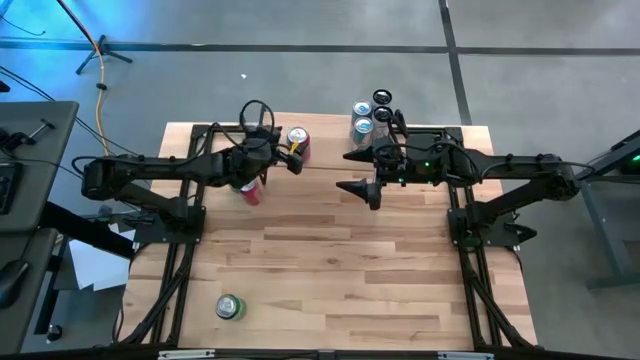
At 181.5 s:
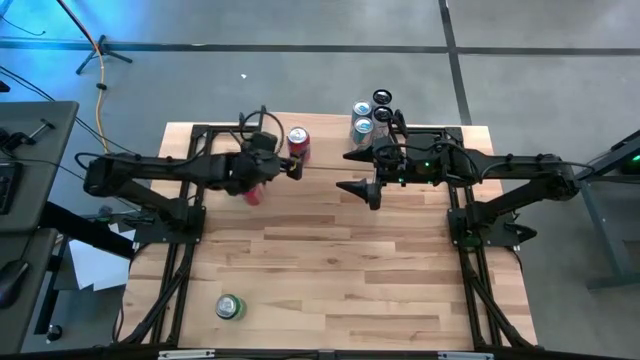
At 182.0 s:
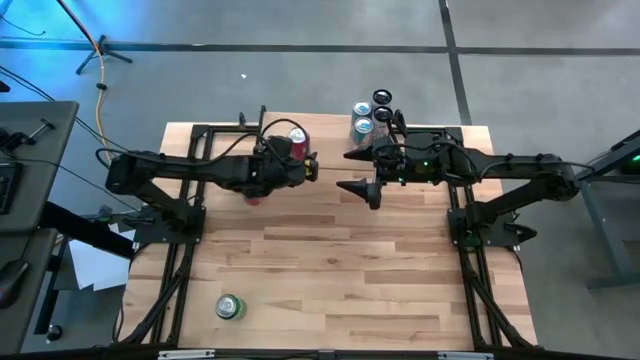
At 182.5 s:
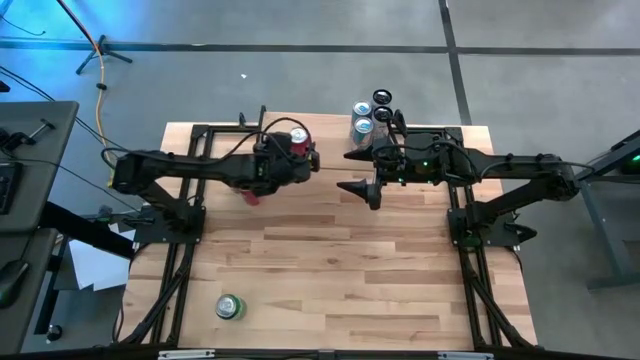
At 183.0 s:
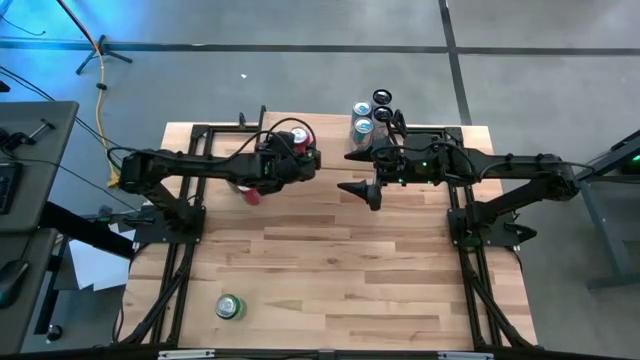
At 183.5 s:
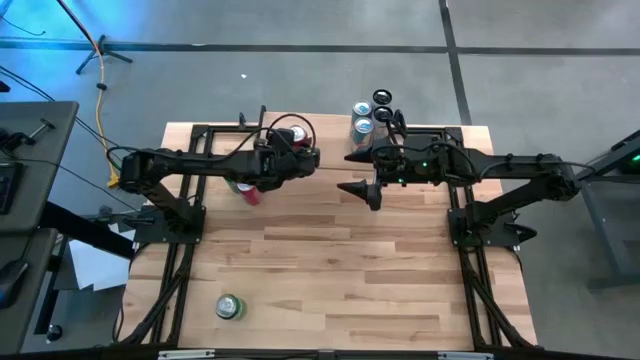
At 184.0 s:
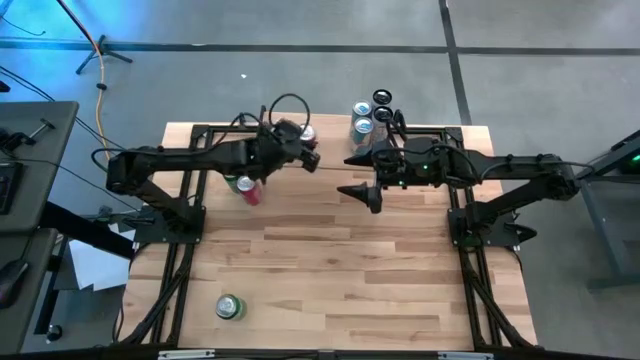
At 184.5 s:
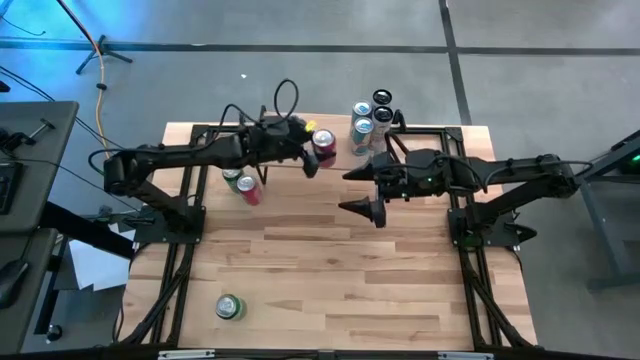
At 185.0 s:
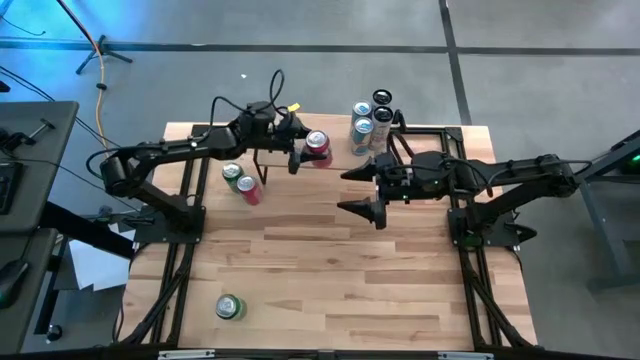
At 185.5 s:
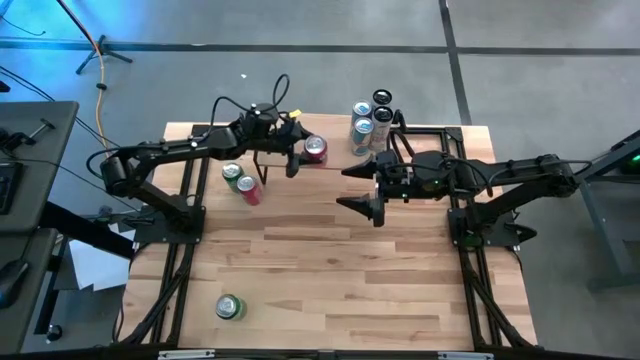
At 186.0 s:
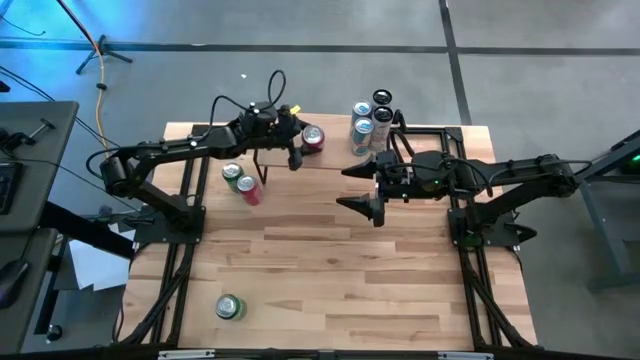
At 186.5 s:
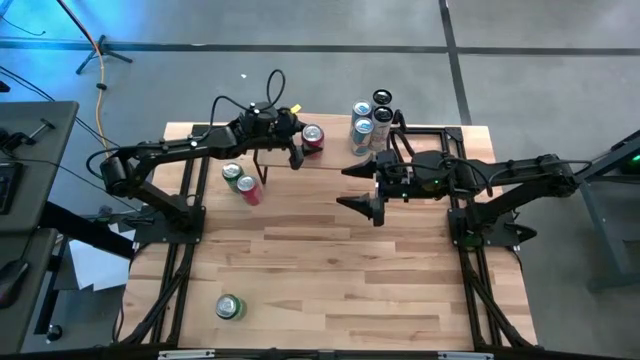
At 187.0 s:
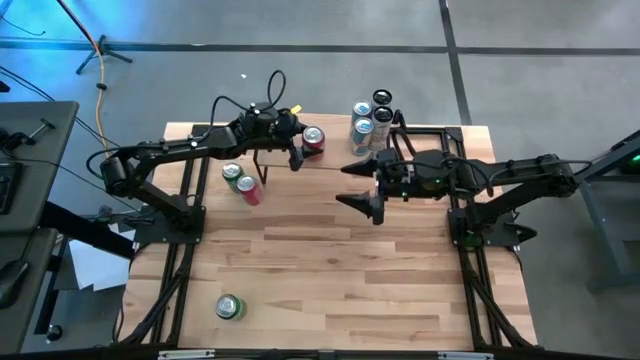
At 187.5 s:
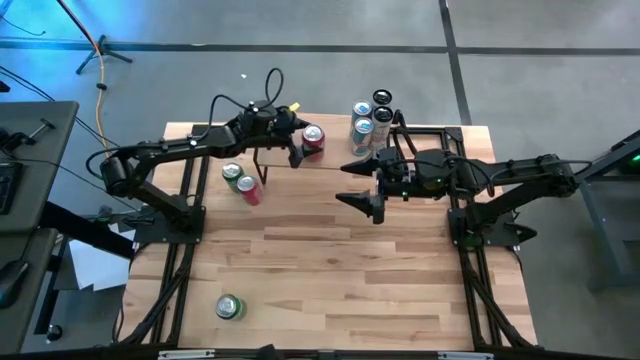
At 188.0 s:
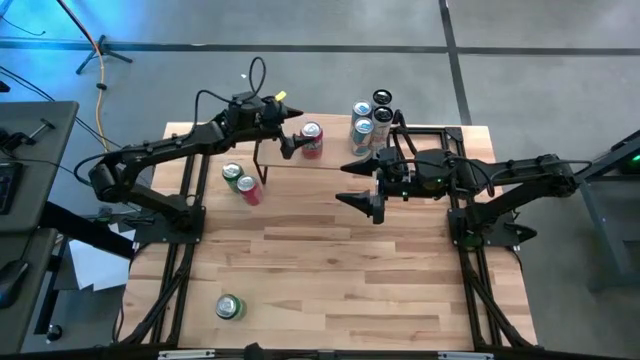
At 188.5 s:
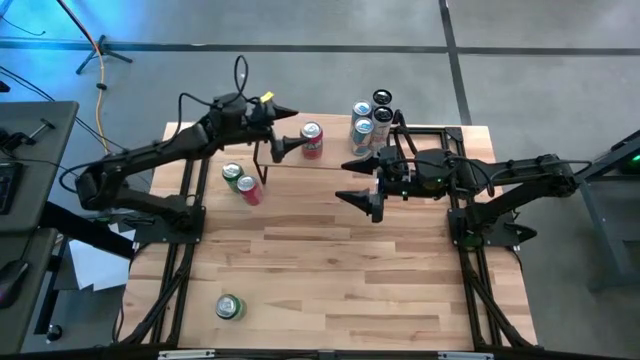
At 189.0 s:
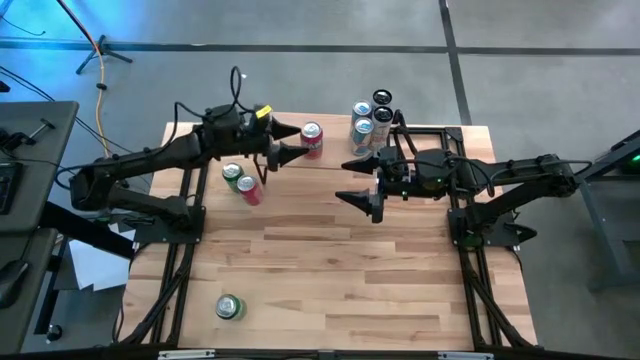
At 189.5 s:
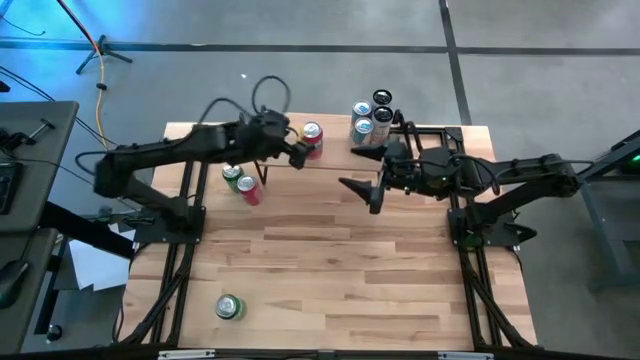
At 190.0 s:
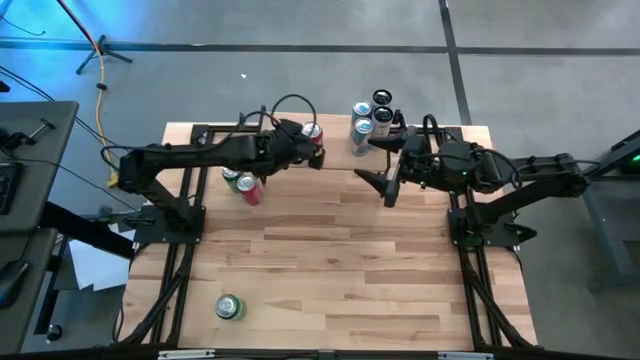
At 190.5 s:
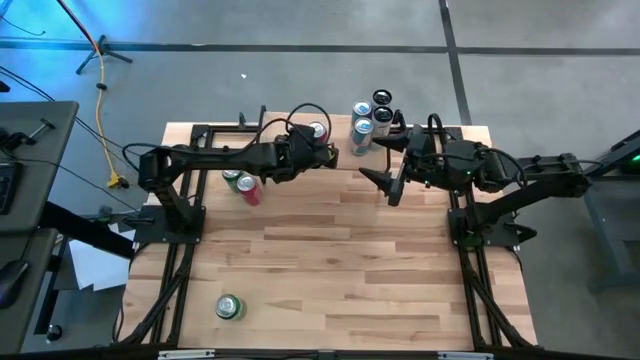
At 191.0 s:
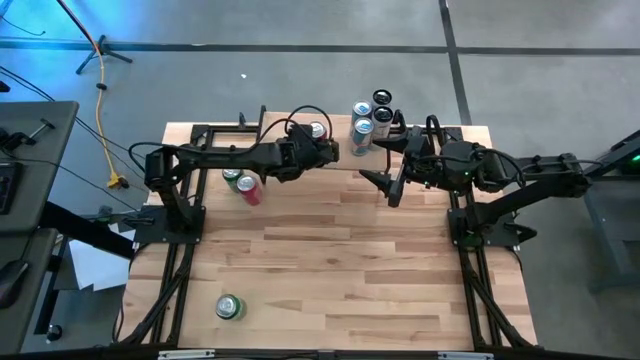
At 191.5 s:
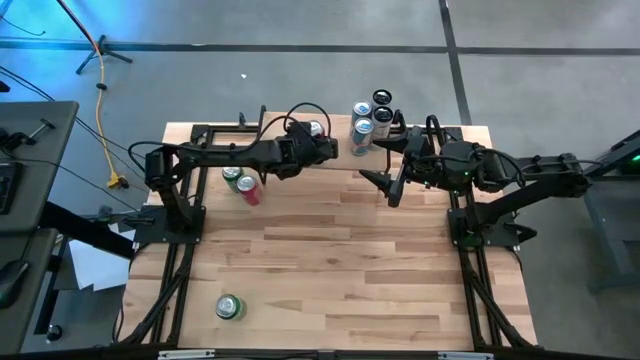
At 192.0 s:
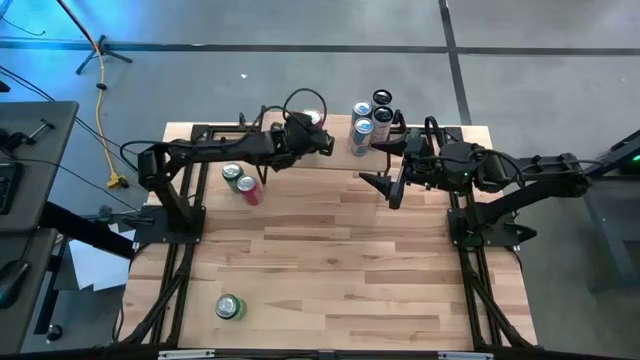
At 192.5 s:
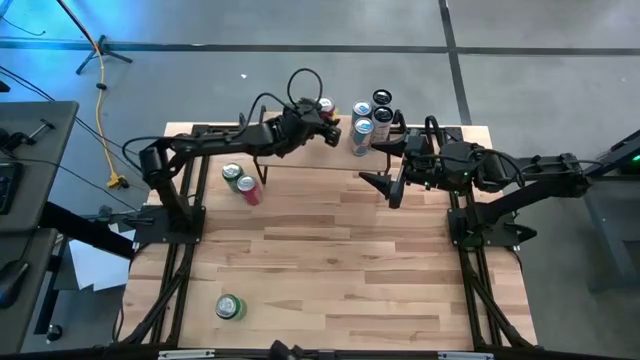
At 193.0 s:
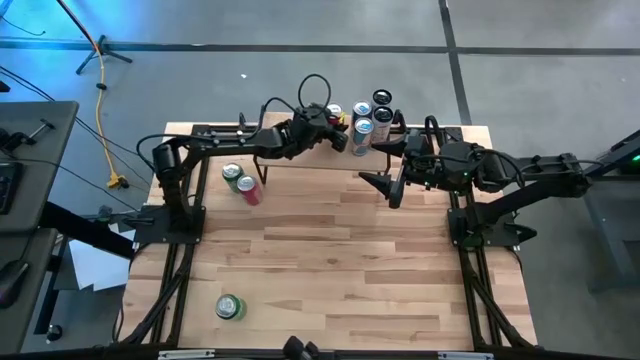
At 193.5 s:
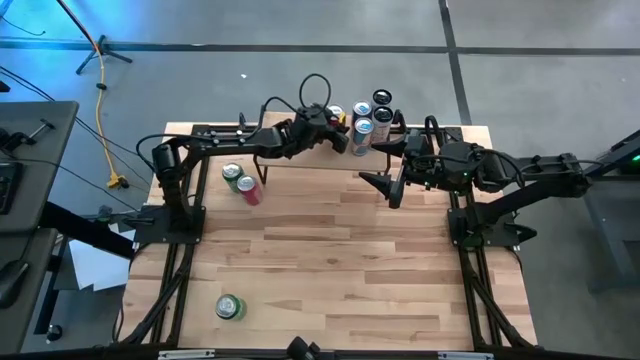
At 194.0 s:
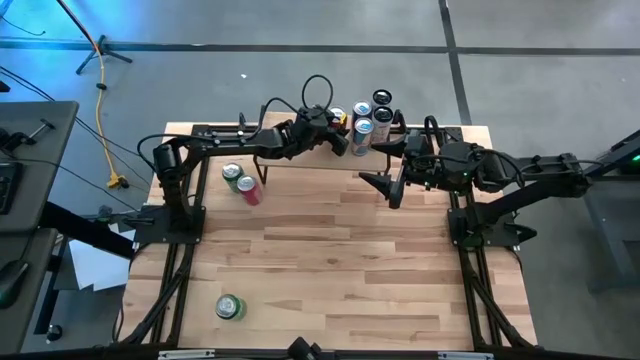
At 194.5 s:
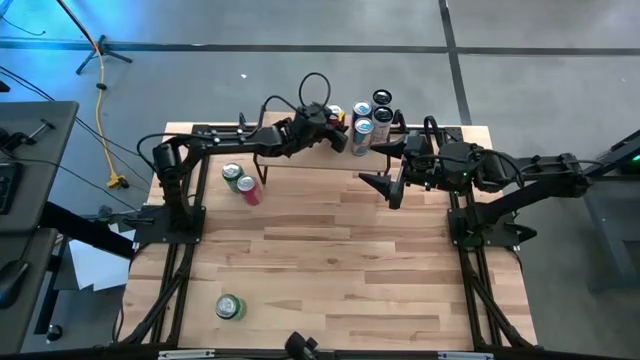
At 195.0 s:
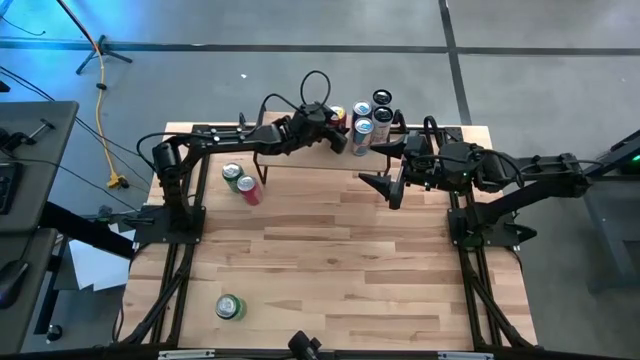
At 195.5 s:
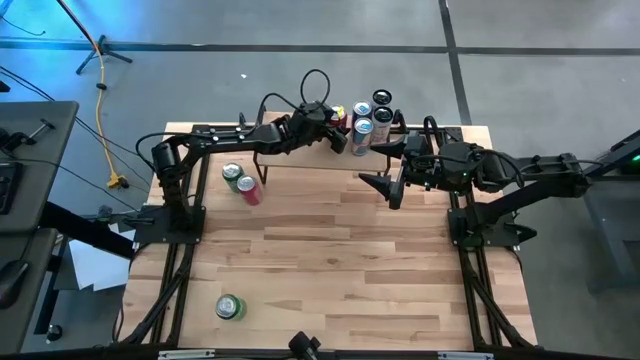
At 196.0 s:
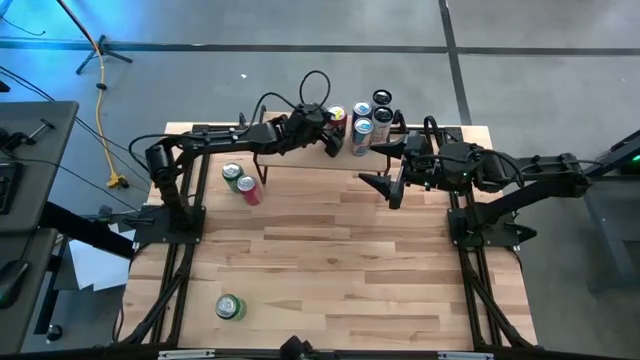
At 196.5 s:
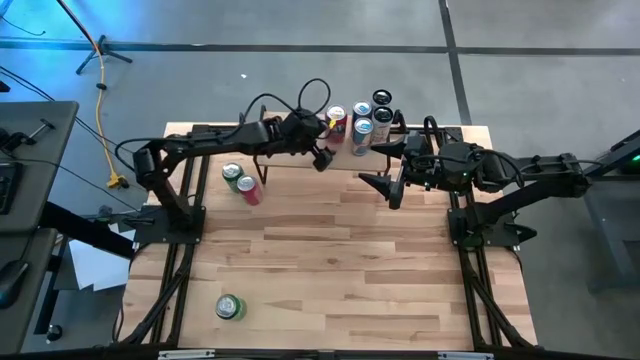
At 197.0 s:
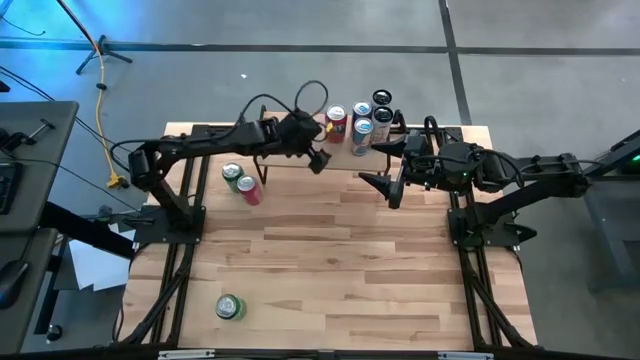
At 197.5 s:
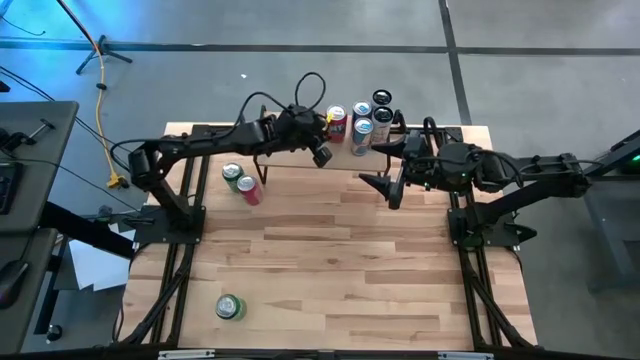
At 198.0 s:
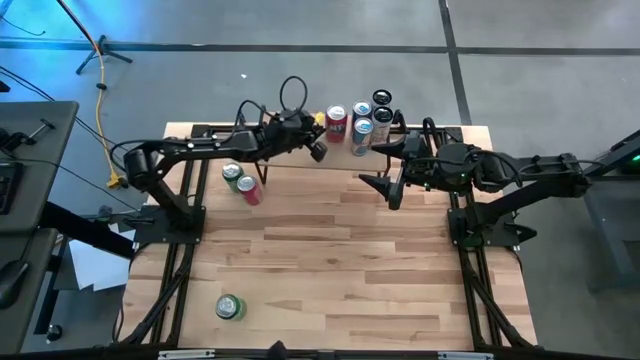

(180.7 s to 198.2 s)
Task: Place canned beverage on shelf
Put the bottom red soda can on the shelf
